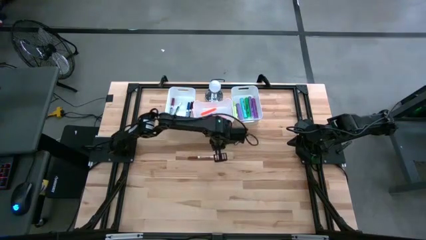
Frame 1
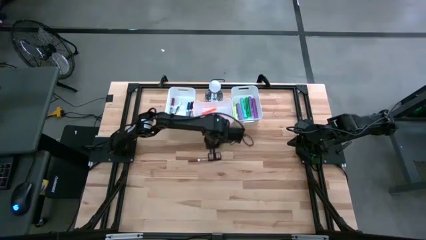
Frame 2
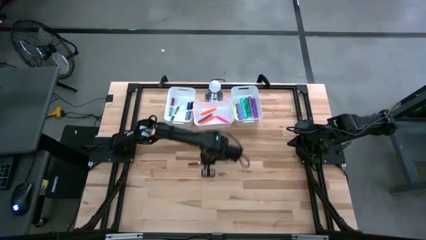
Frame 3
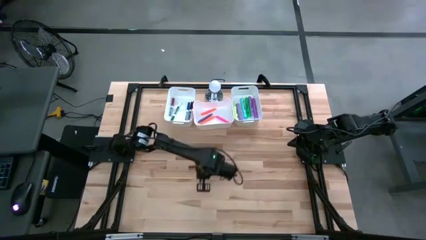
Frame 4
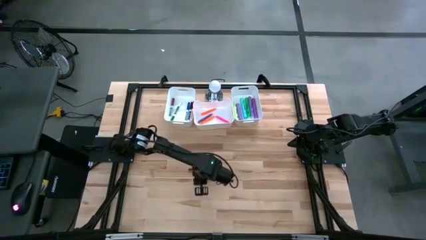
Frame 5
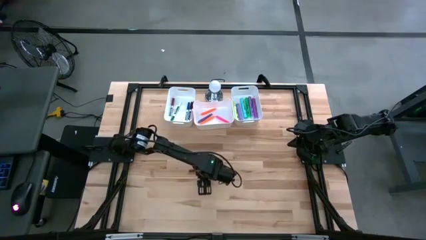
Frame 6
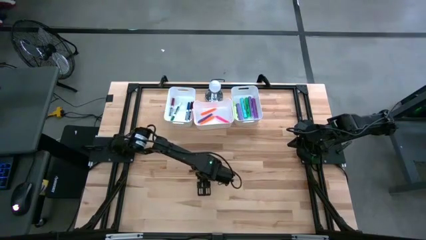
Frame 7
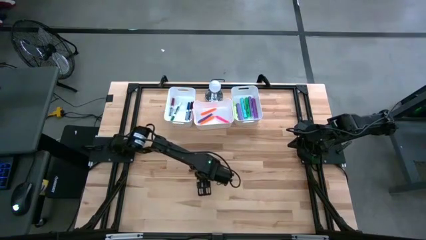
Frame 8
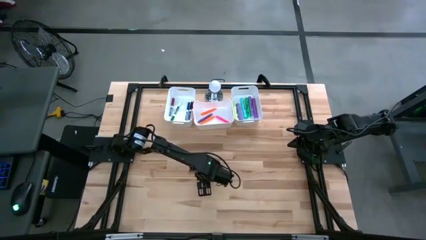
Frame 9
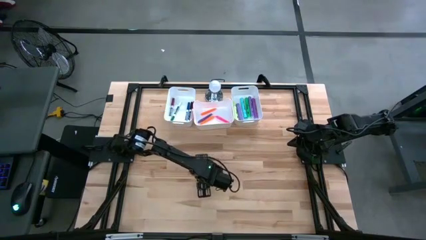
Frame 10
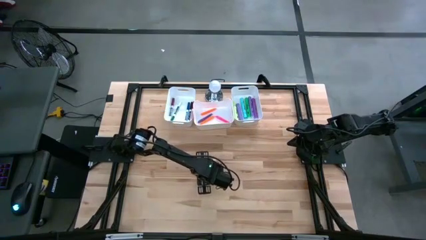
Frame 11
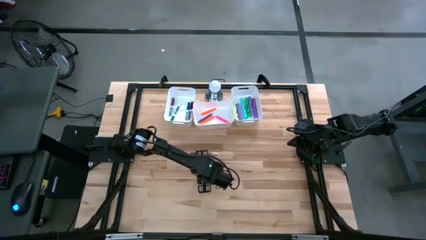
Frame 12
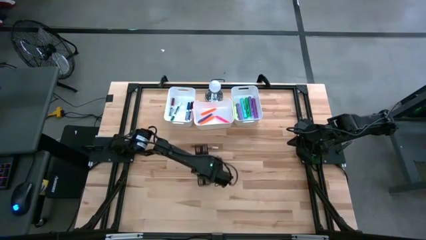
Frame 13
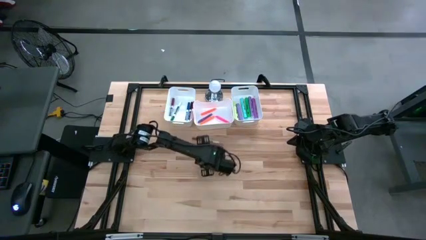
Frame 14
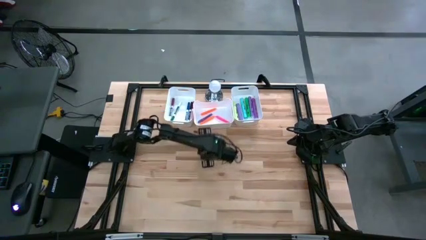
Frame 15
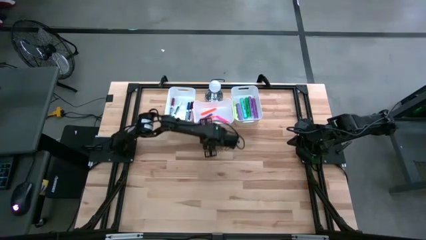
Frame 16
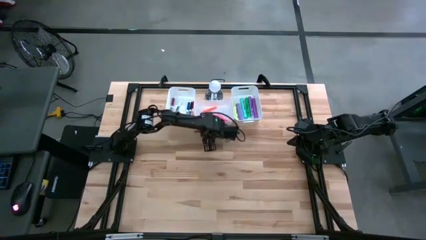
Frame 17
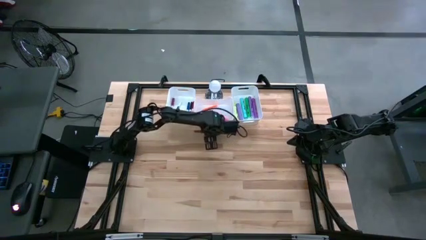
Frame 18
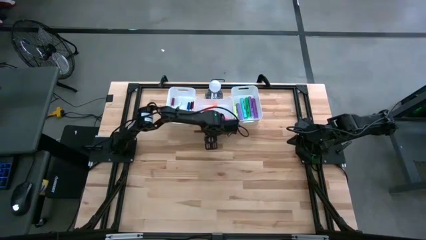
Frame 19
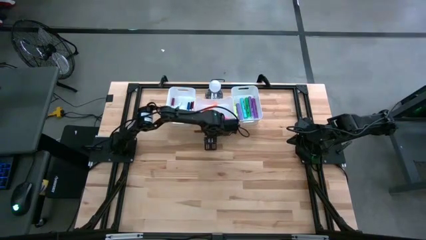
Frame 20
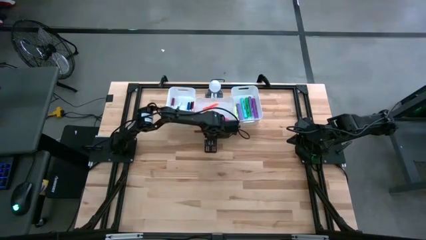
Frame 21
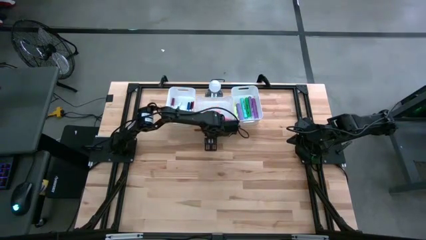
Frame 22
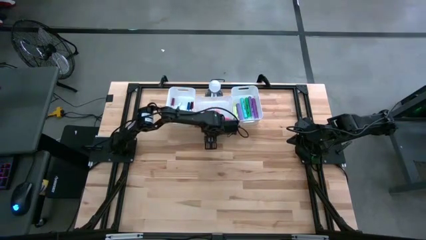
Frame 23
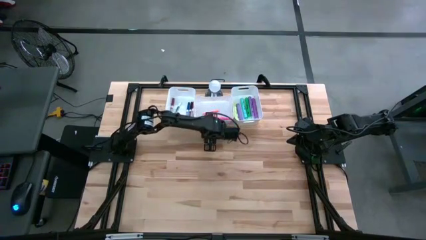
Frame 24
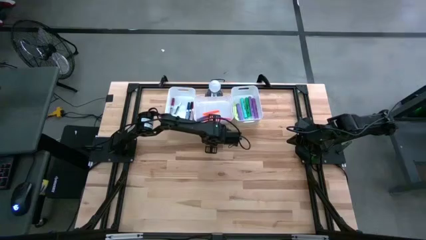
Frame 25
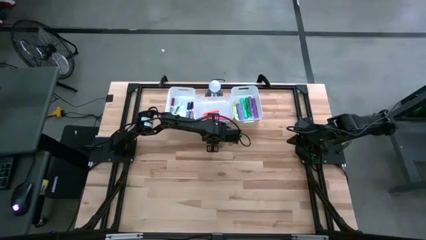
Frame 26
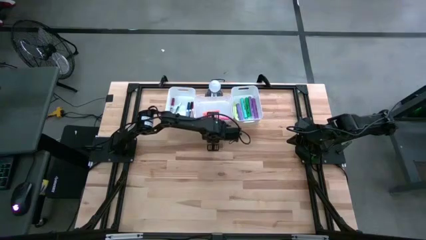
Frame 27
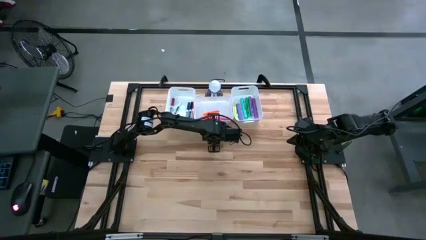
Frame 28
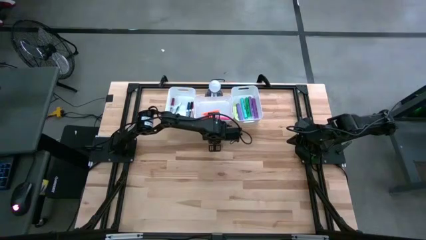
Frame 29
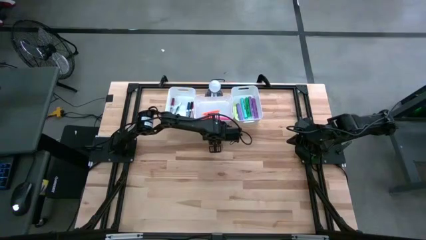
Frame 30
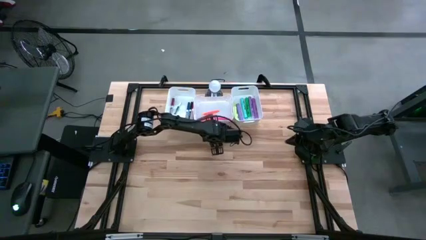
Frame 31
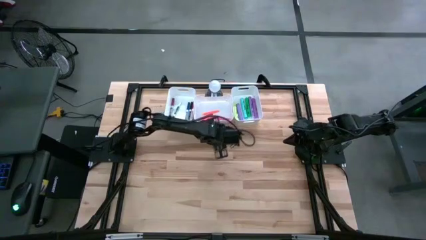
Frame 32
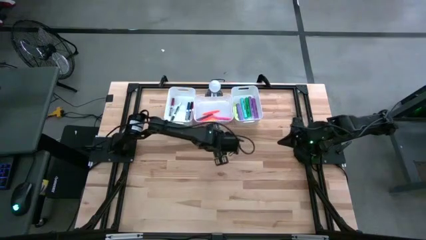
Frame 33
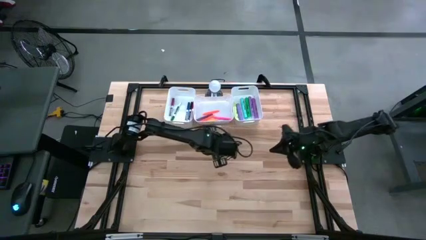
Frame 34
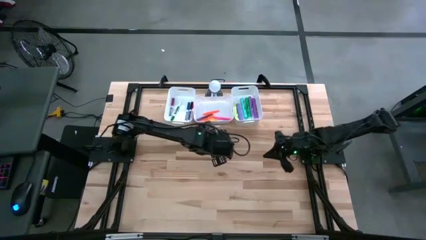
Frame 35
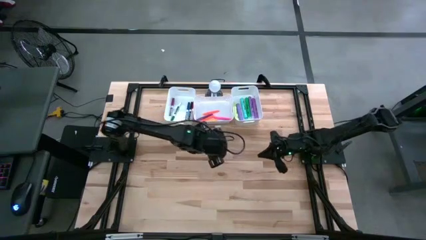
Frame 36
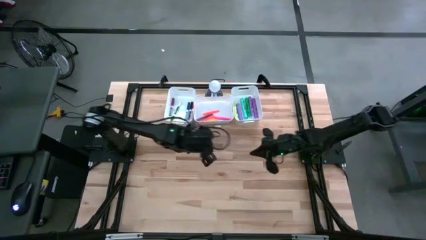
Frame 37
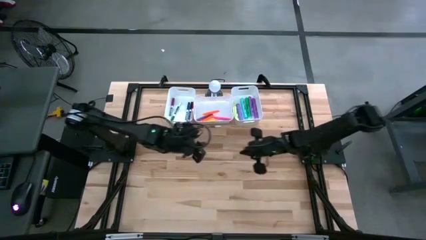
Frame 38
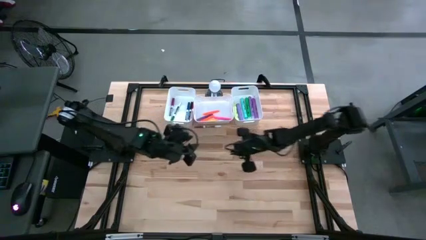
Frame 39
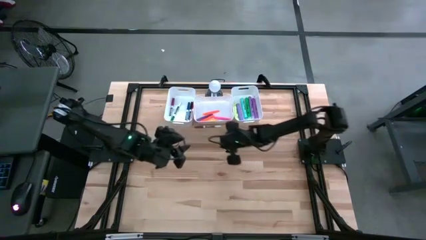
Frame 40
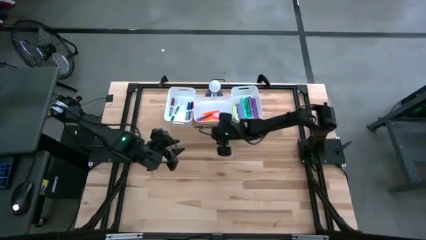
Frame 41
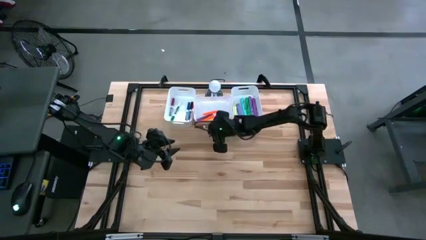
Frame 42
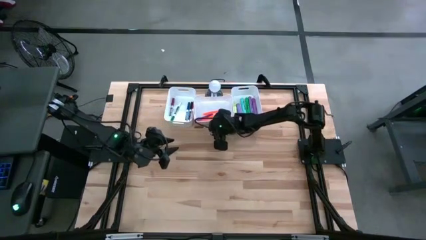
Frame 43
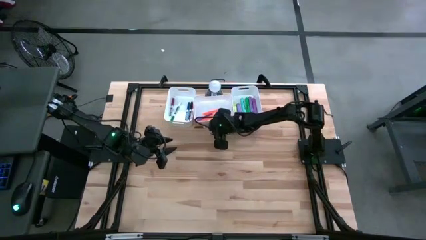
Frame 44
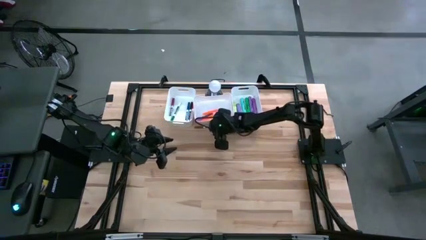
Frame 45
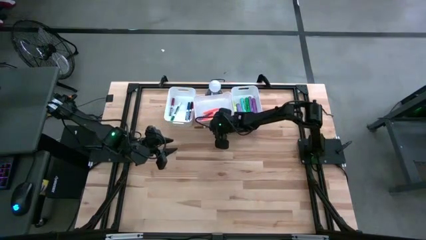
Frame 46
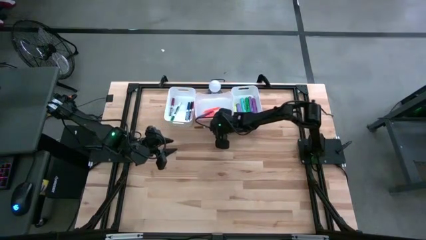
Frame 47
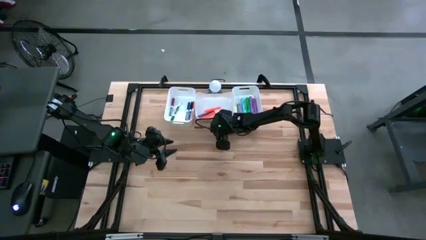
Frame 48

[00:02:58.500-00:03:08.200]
Task: Pick & Place Markers
Put the brown marker pen into the middle white bin

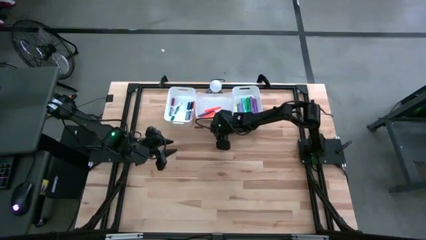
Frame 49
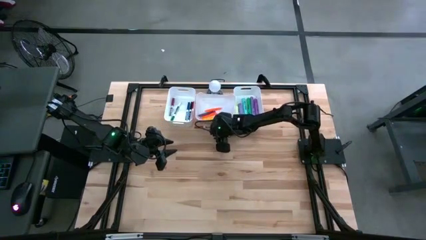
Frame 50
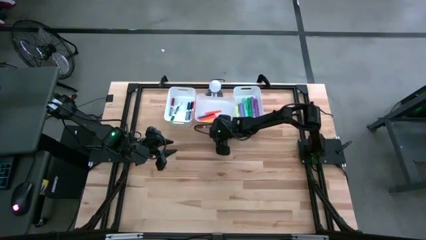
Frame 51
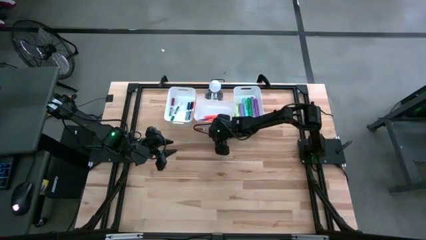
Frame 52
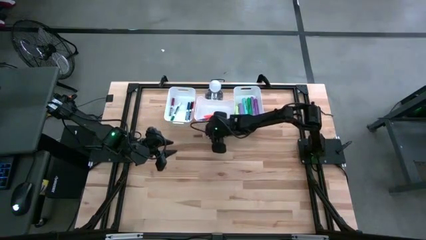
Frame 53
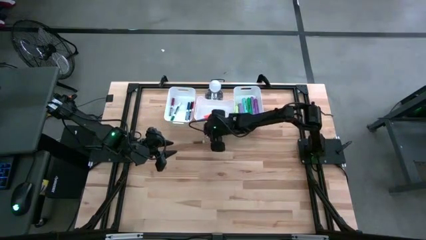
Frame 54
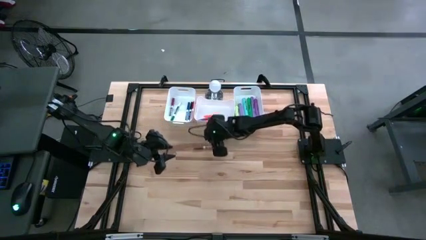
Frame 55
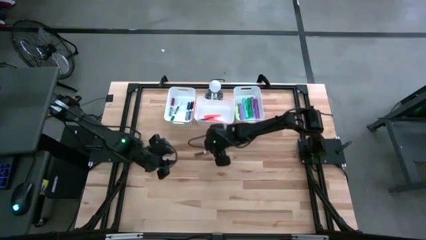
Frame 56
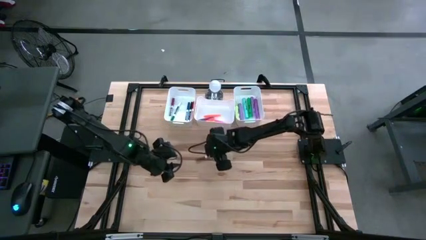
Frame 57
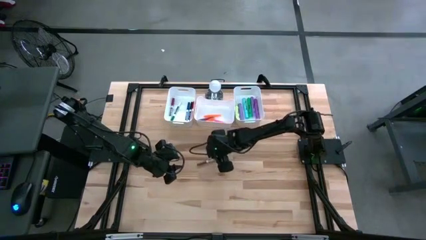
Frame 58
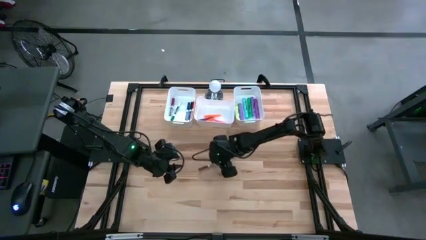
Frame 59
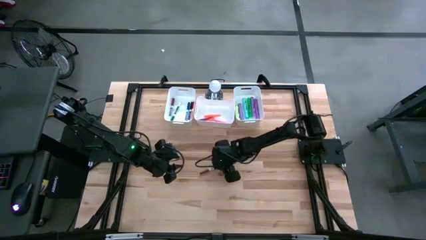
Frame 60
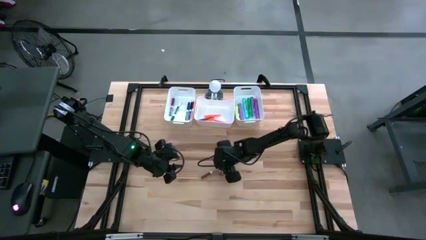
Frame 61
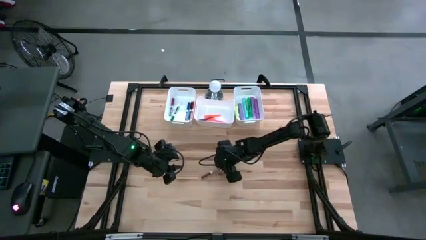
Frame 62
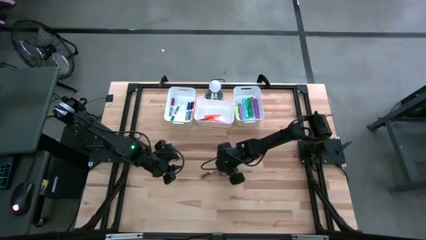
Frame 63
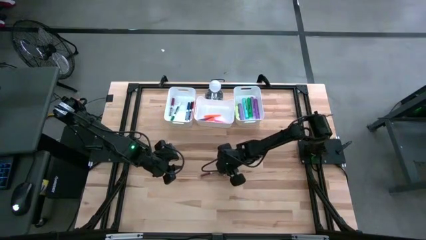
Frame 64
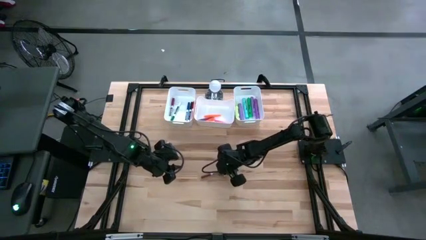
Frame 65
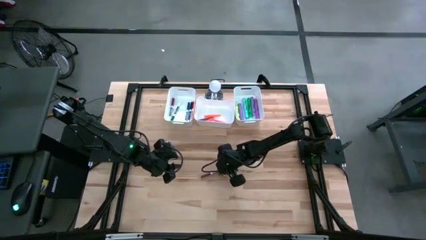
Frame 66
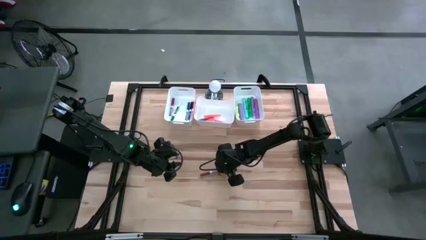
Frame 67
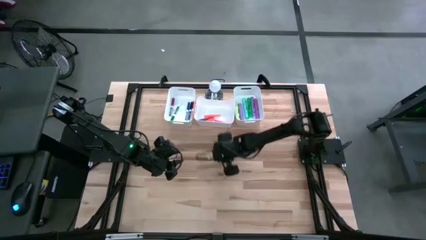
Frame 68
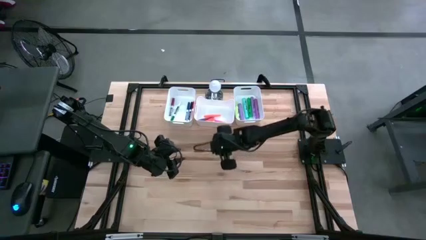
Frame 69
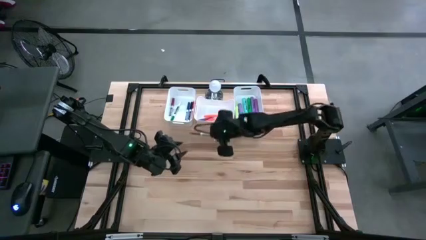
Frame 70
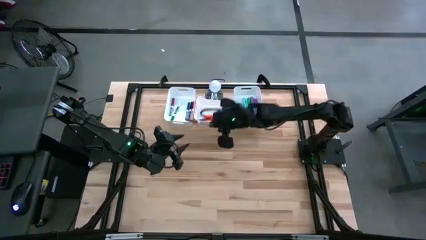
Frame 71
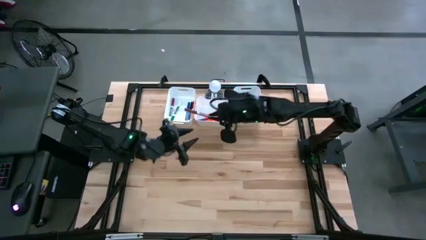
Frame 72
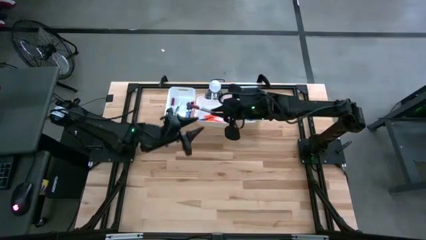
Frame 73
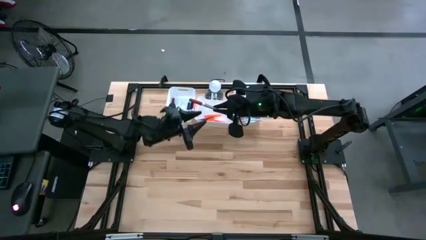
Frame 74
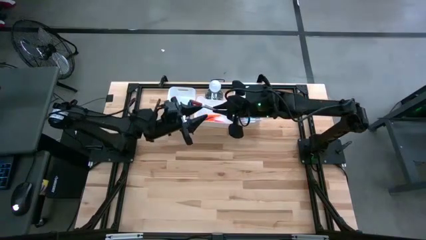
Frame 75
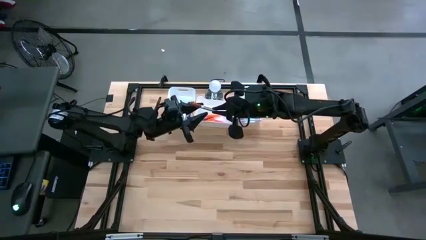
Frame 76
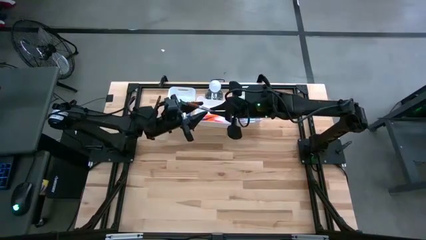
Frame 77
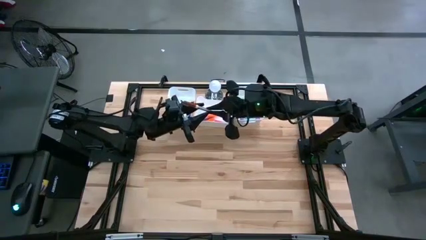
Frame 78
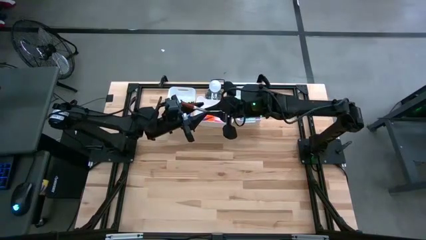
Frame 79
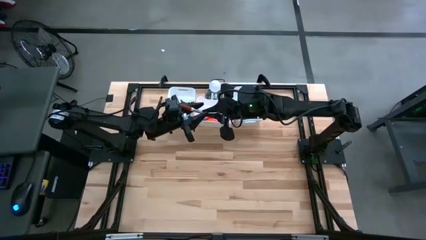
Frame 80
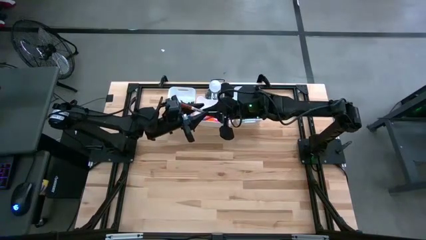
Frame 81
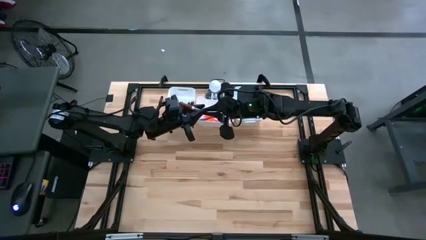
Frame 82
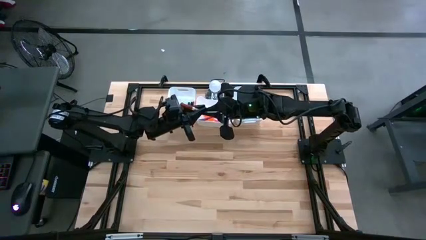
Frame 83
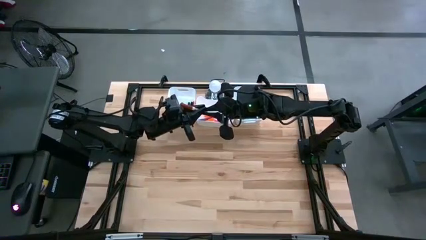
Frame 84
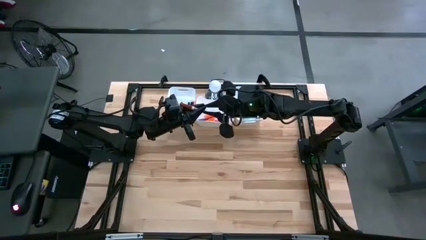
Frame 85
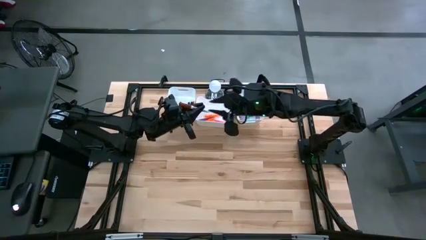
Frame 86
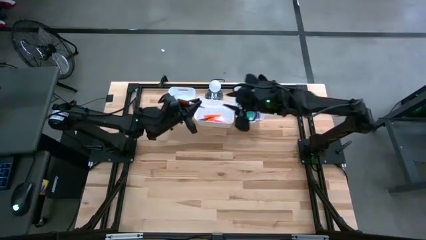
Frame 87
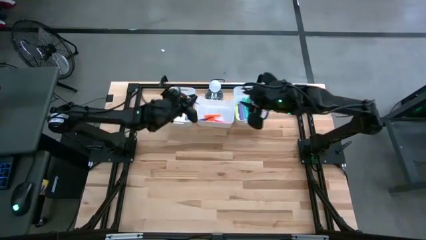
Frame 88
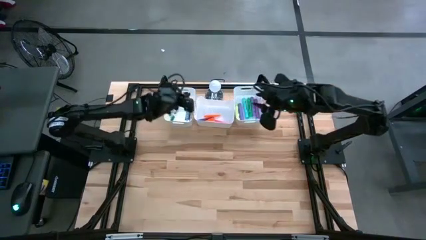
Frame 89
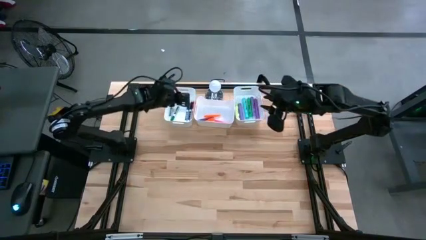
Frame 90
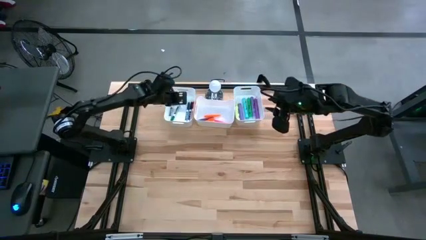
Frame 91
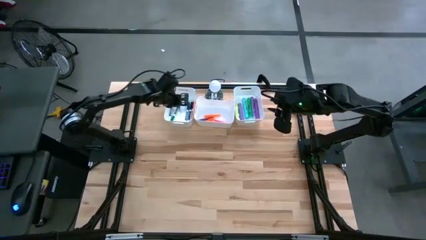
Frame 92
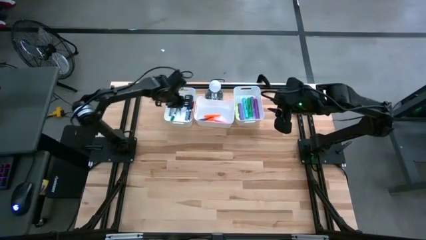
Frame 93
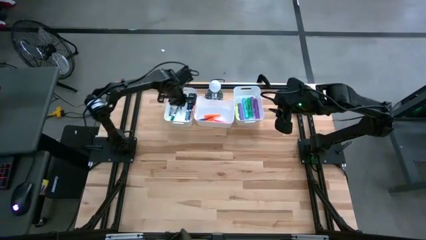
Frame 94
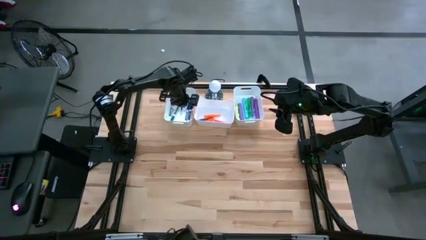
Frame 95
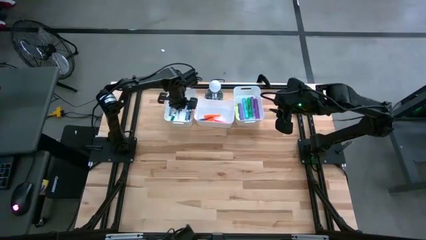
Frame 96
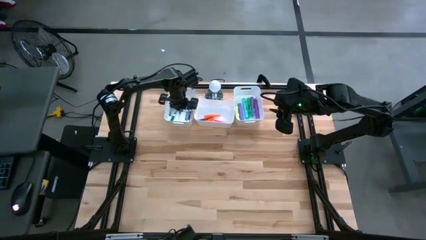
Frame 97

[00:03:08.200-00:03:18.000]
Put the brown marker pen into the middle white bin
